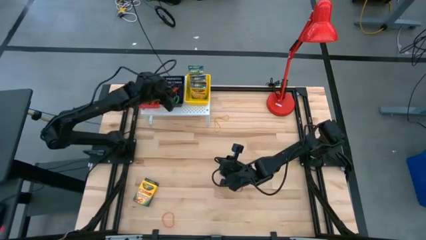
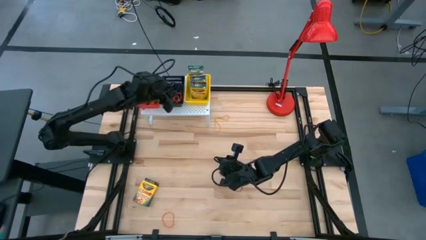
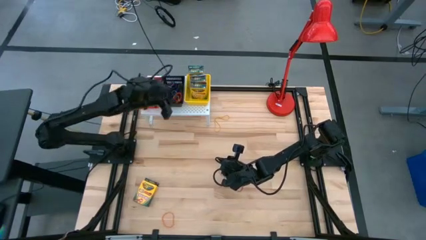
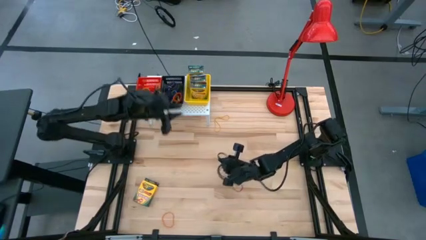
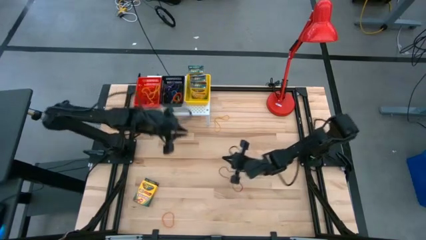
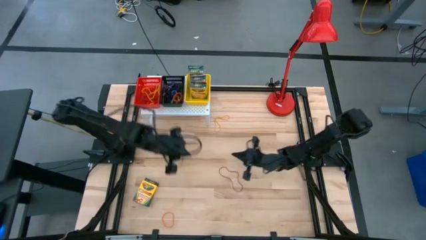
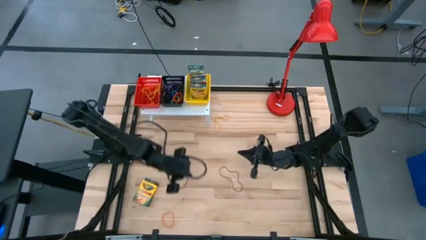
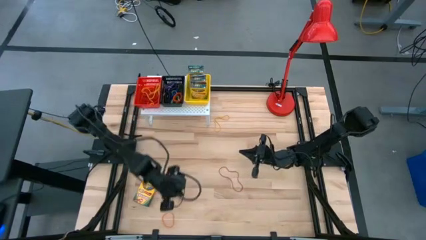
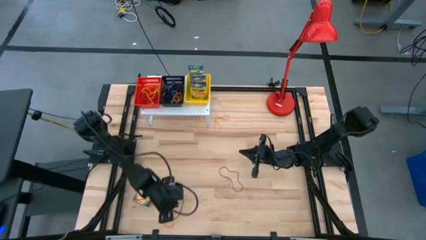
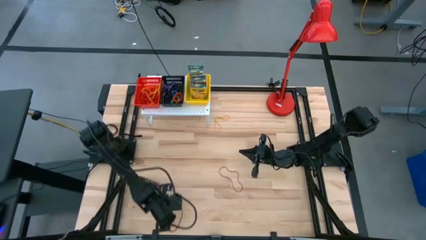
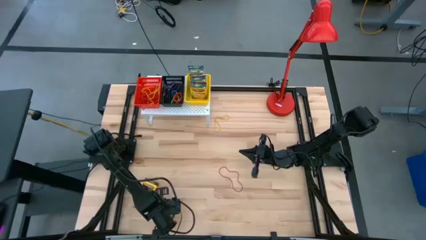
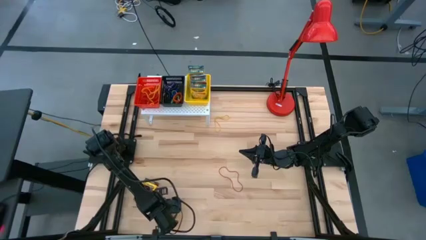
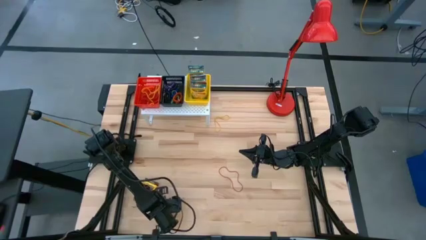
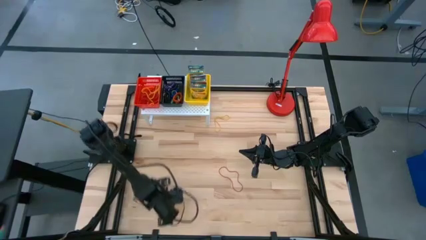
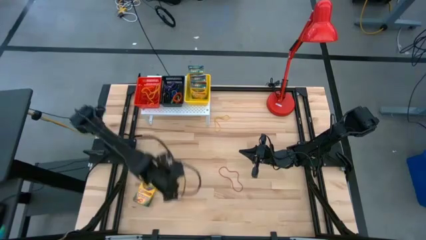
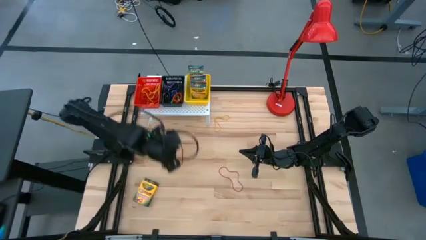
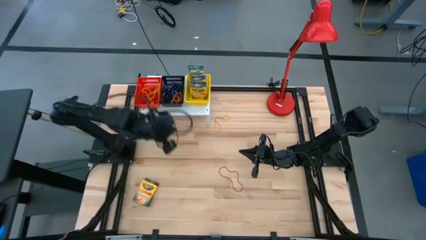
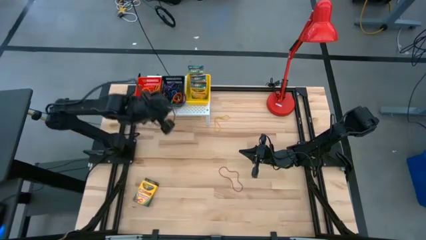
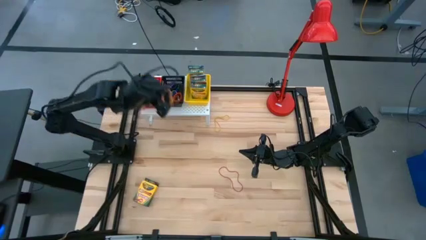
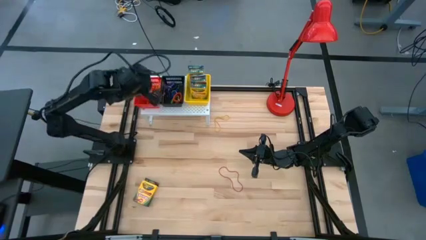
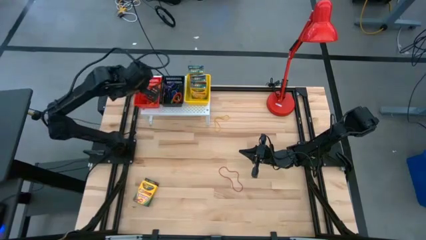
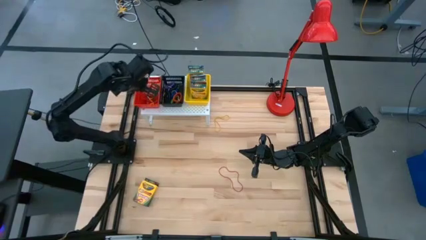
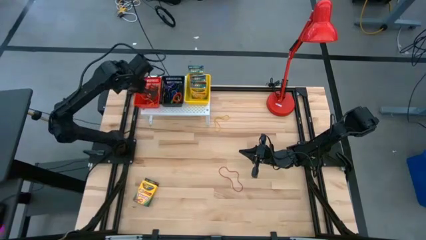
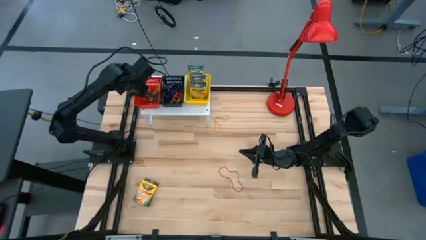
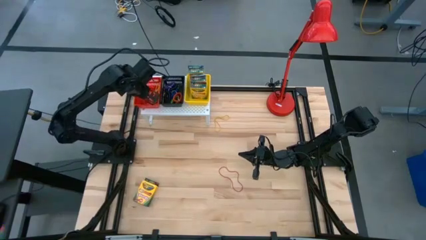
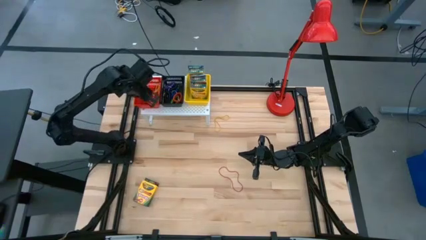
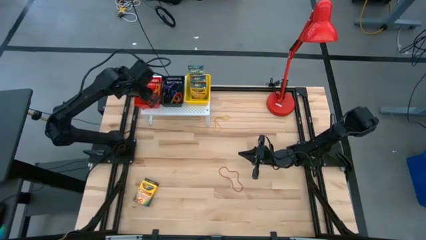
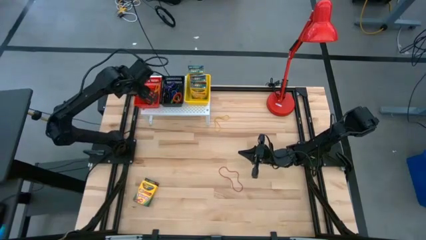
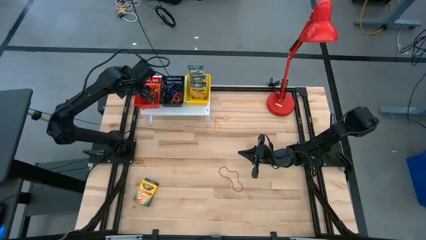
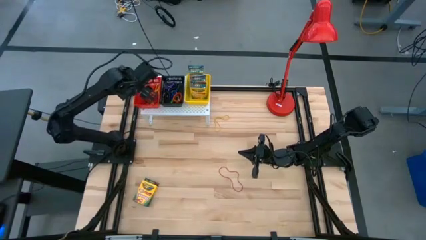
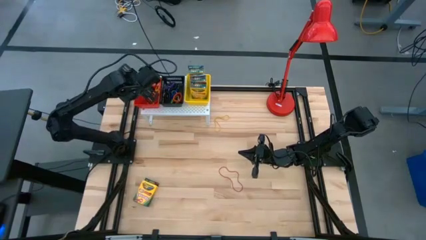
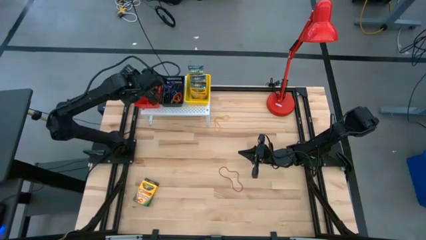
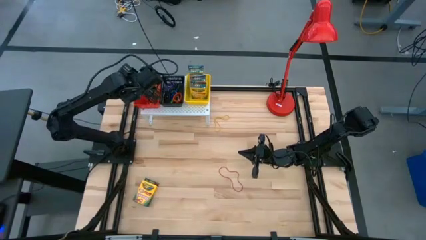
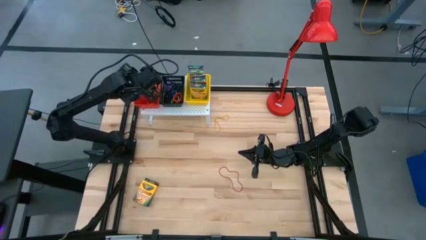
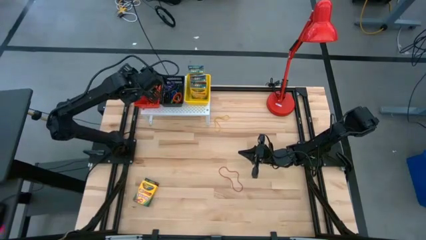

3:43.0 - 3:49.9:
Task: Pick & Place Office Desk Supplies
Put the orange rubber band into the red bin on the shelf

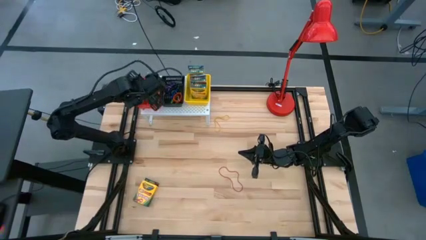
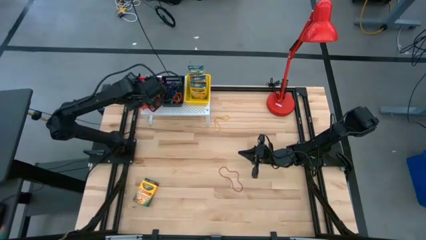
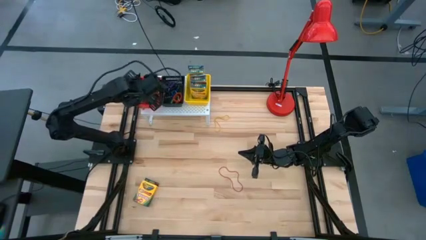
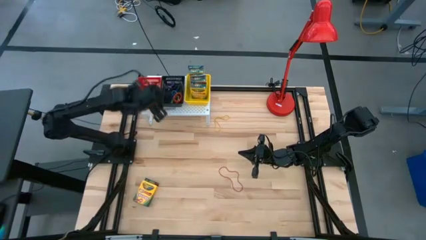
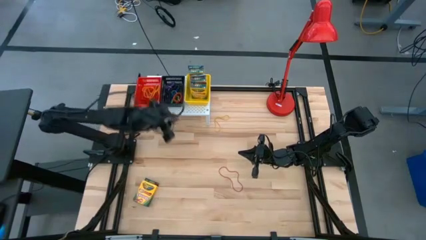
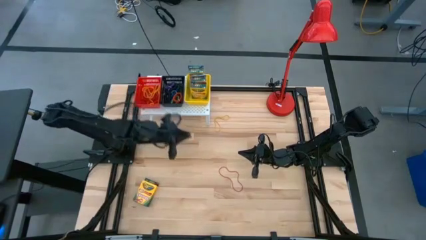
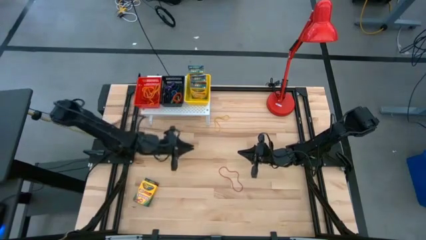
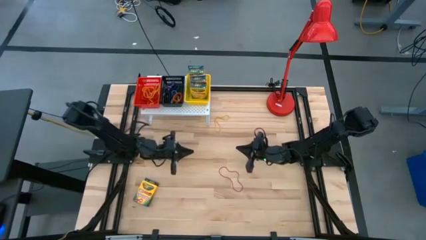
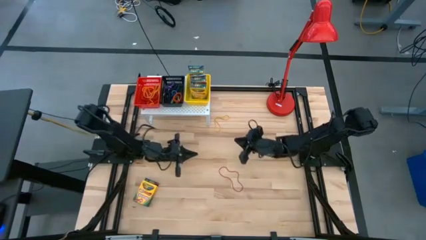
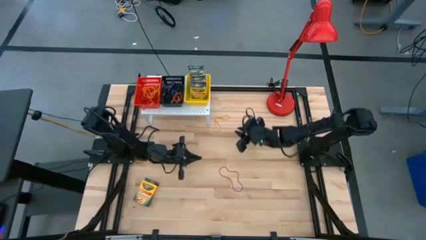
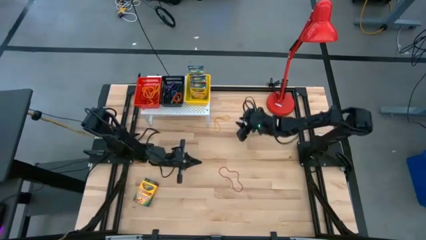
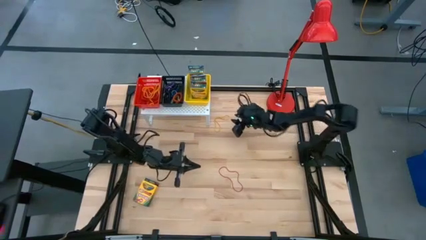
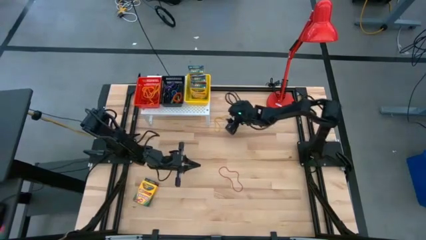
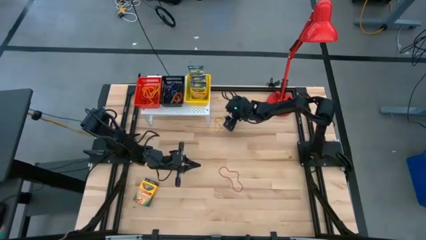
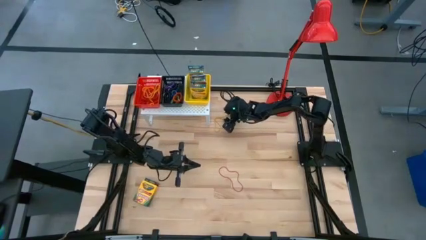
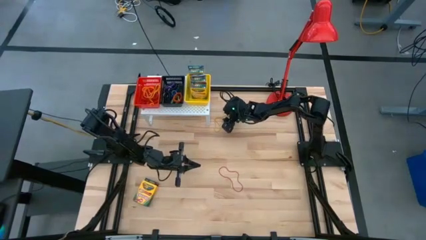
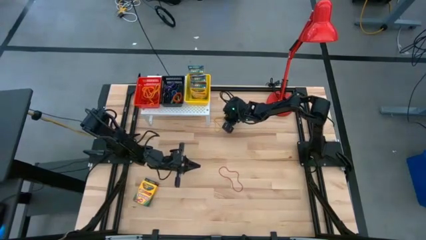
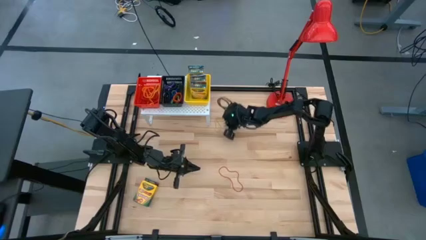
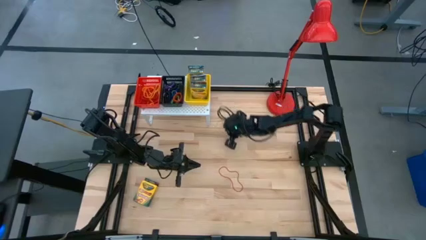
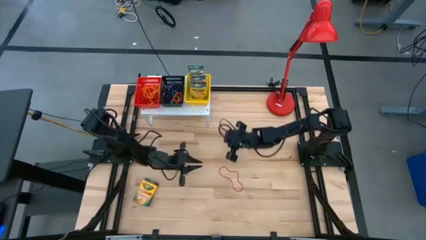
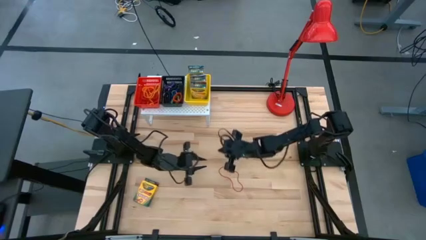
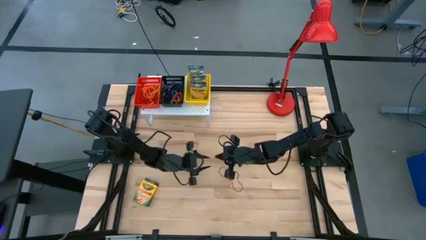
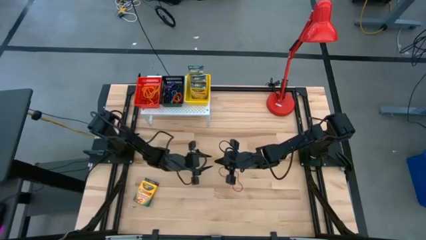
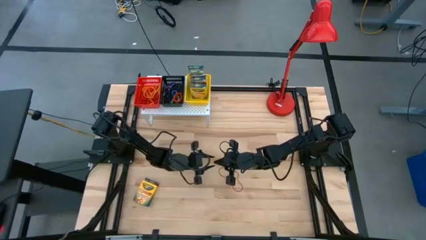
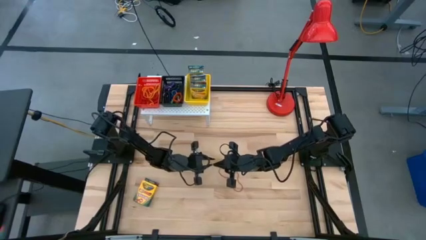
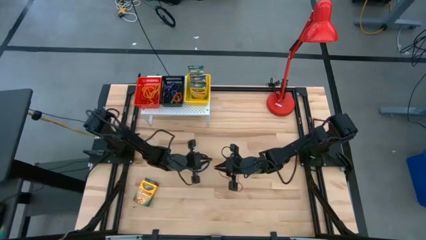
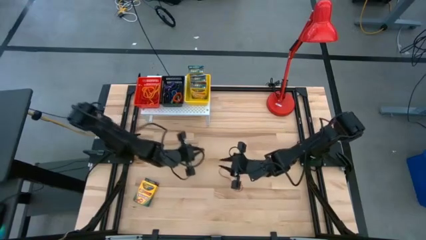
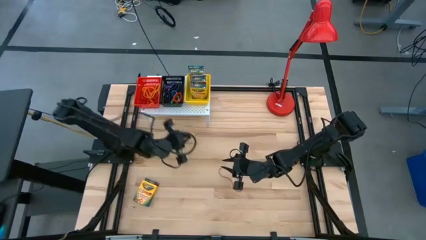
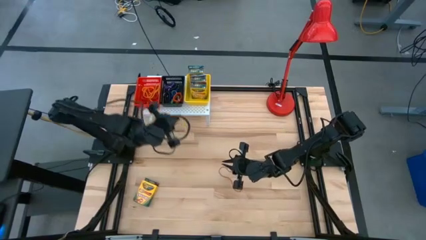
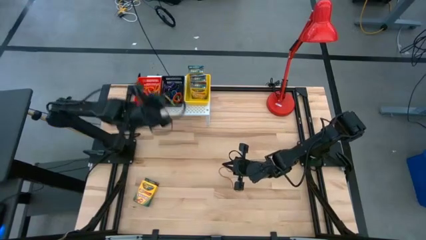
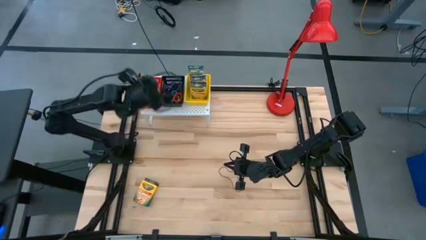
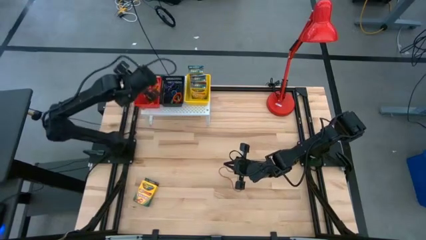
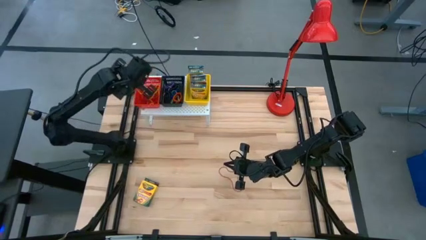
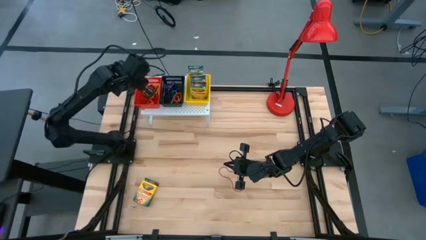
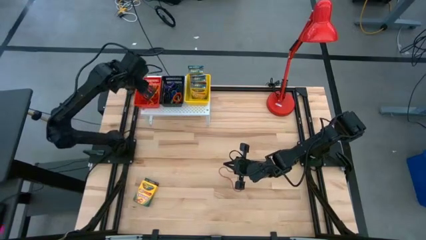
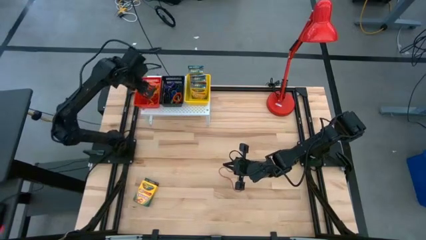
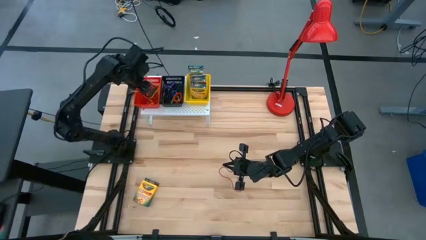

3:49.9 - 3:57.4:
Put the yellow rubber band into the red bin on the shelf

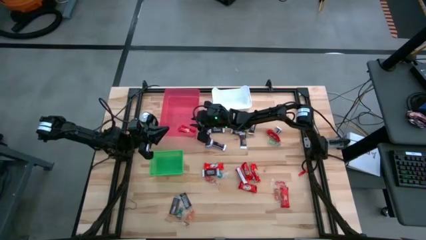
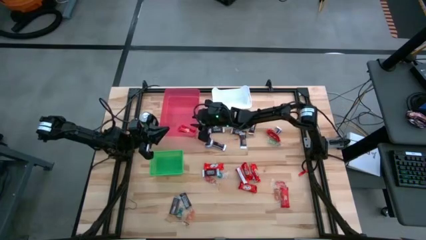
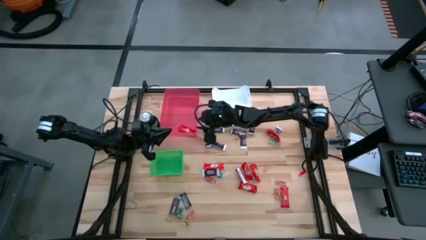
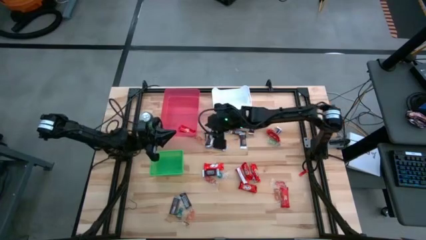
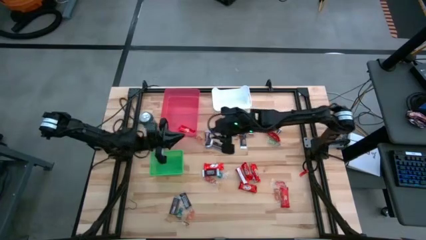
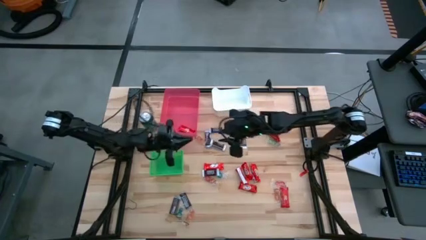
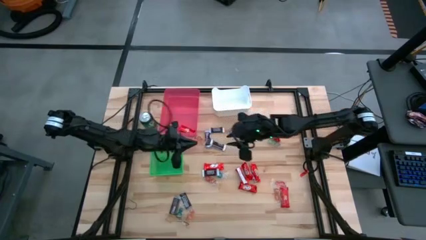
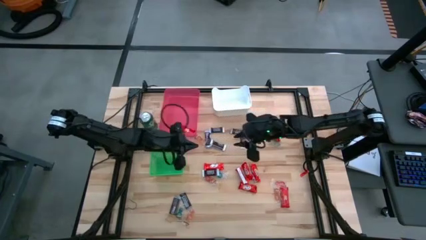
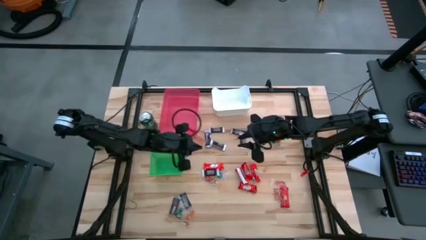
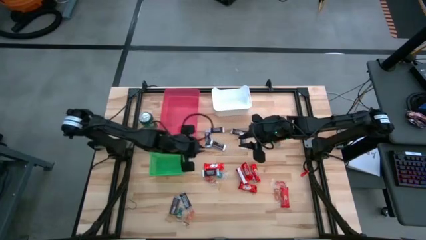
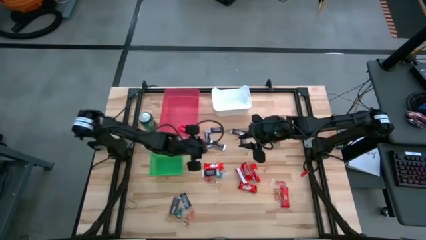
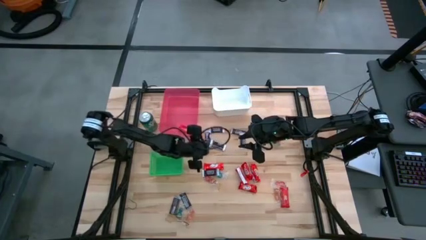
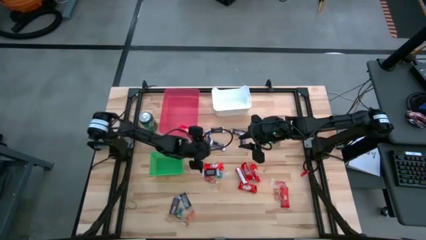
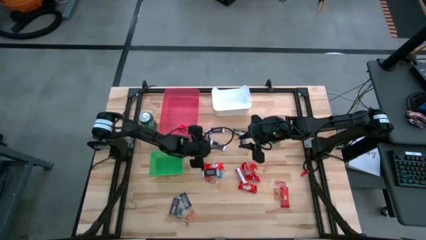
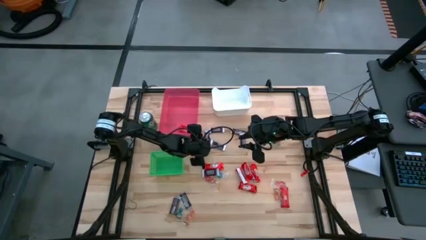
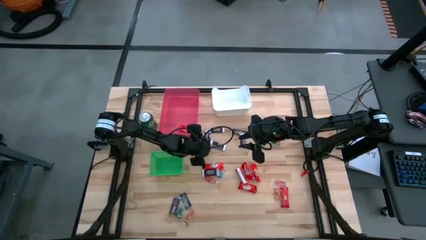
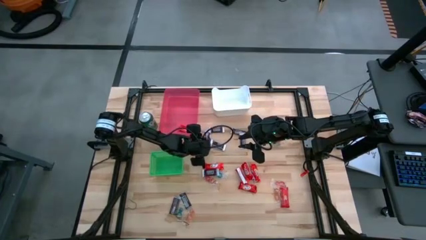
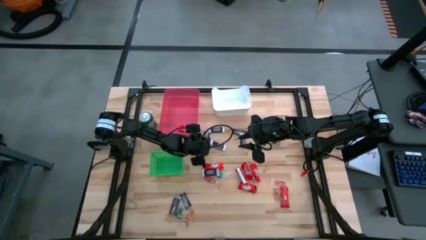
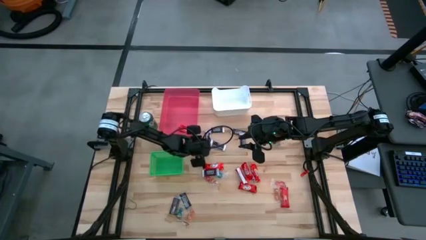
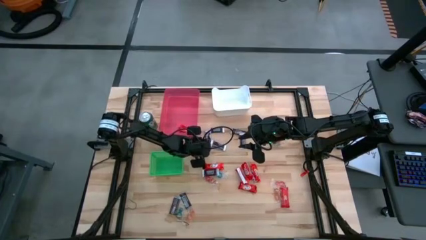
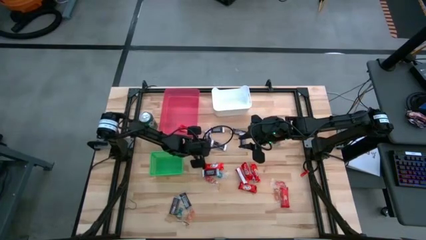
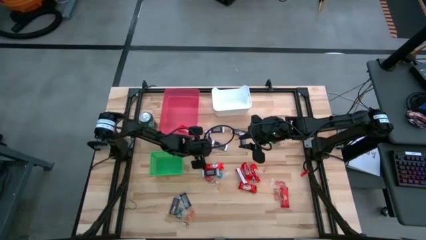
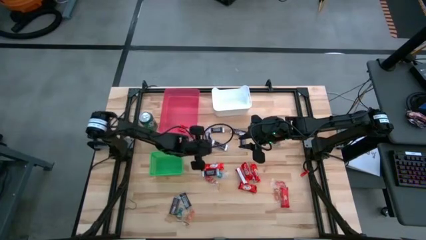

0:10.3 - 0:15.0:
Task: Organize candy in baskets
Put the orange gummy into the green bin
